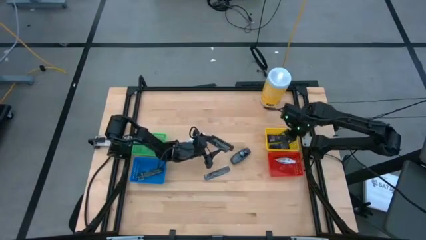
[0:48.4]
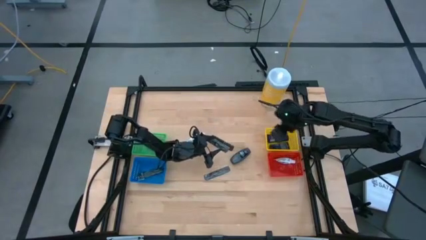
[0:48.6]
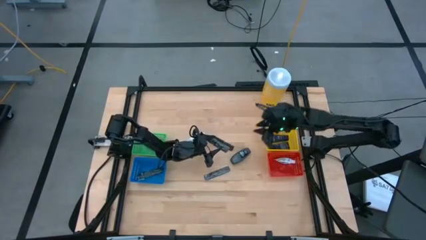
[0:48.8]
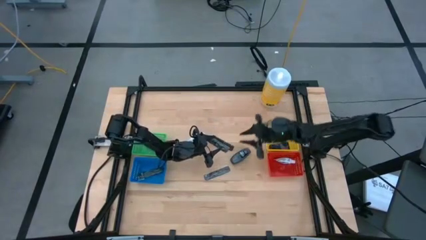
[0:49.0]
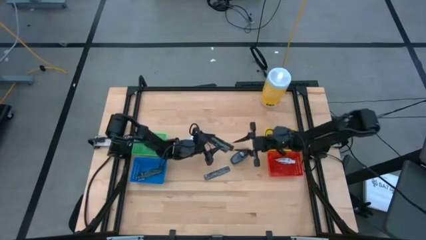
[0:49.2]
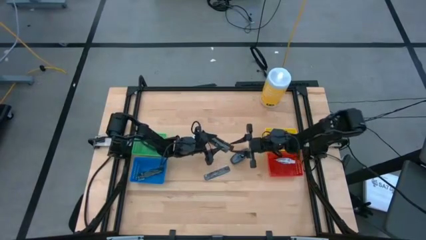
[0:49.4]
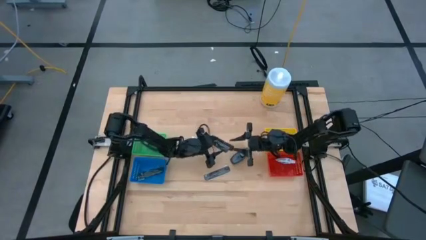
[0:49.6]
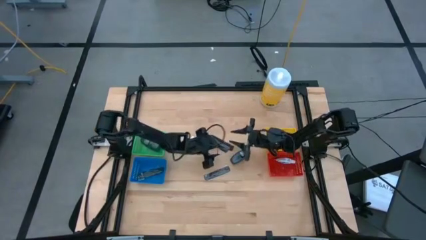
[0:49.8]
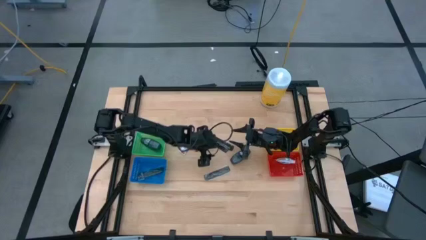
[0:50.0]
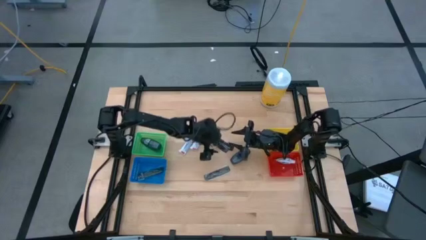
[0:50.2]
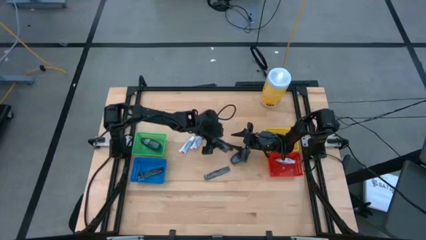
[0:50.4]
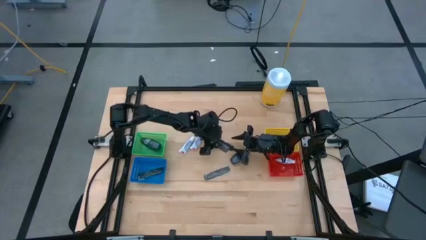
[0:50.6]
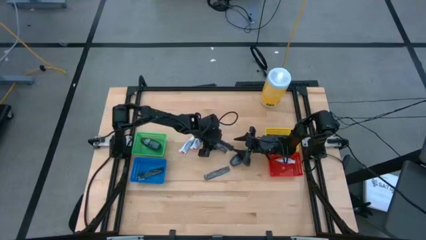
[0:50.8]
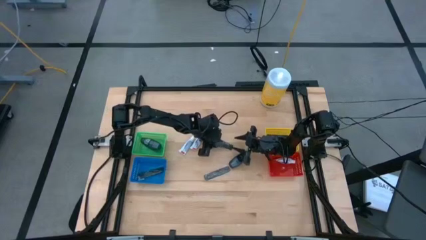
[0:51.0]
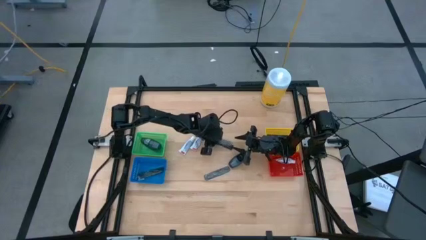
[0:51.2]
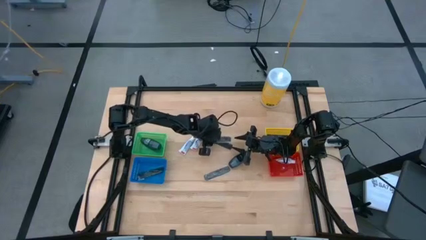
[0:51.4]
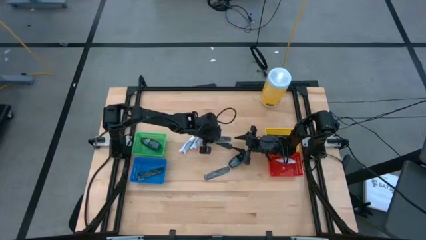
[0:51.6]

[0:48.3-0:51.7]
Task: Pick & Place Travel size toiletries
Put the black comb into the blue bin

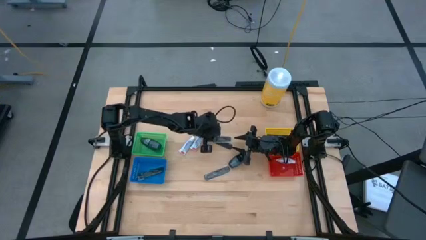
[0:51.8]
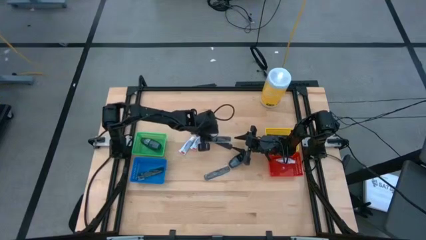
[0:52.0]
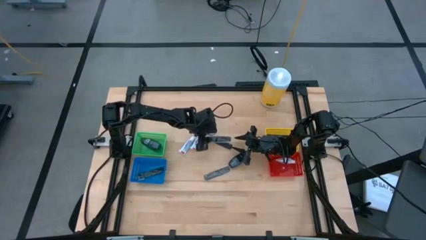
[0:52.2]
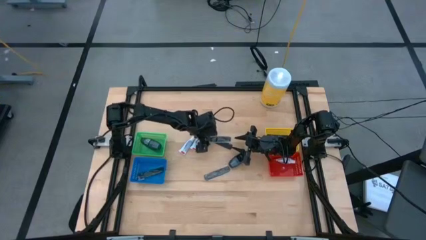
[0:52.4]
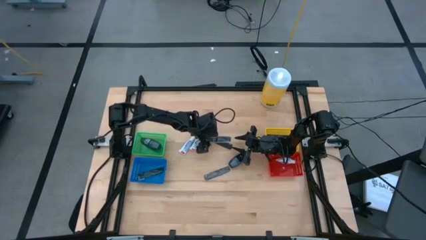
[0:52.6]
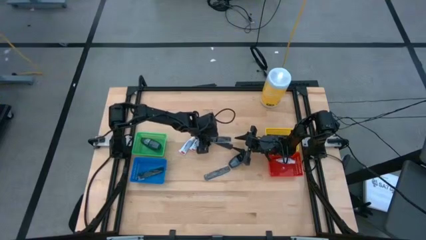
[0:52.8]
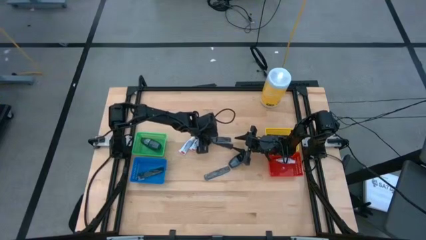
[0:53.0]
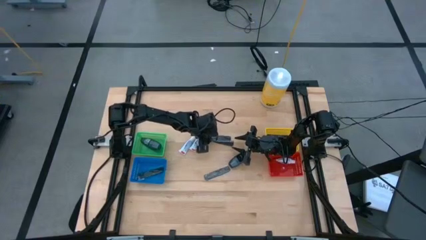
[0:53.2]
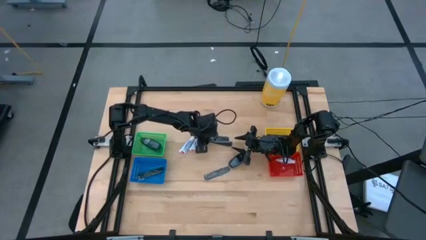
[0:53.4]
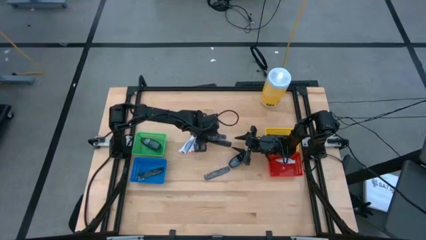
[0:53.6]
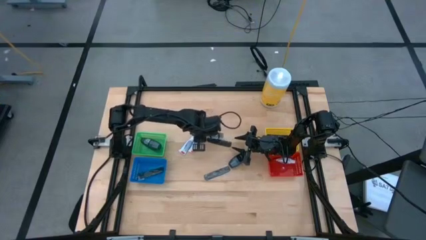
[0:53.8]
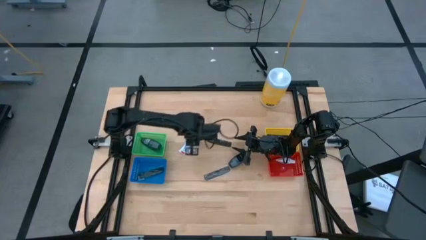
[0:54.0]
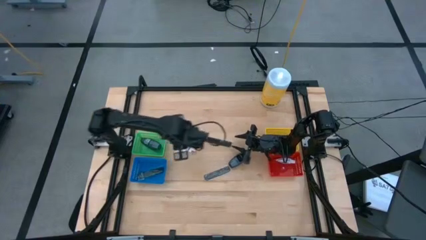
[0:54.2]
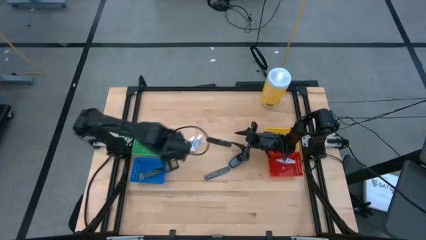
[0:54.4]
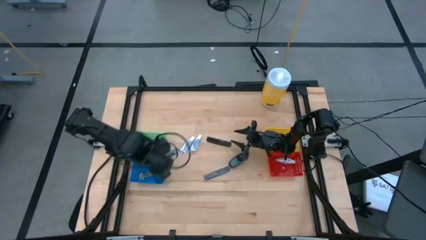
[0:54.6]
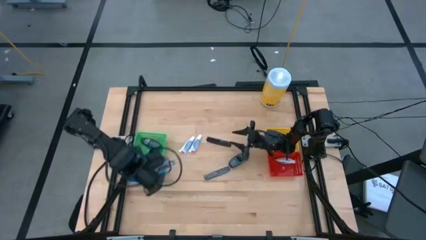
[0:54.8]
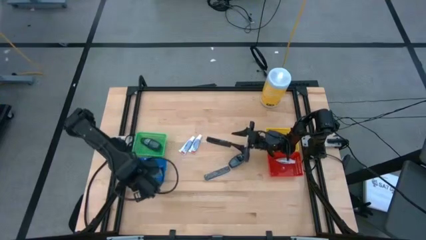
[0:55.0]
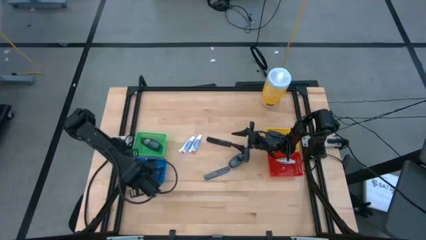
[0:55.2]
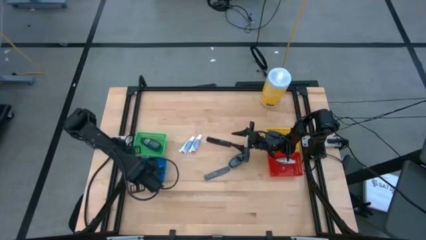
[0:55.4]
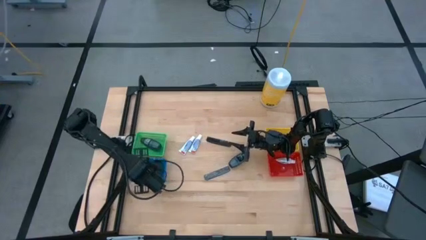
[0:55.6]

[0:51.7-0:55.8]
Put the black comb into the blue bin

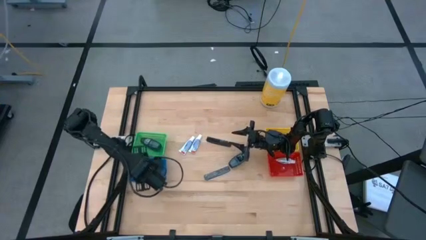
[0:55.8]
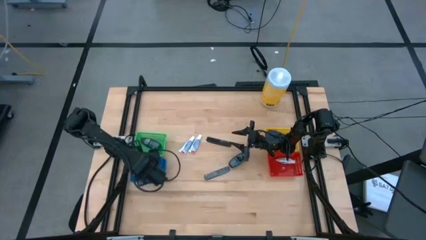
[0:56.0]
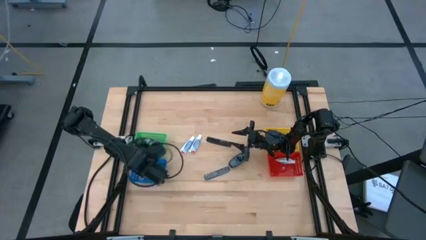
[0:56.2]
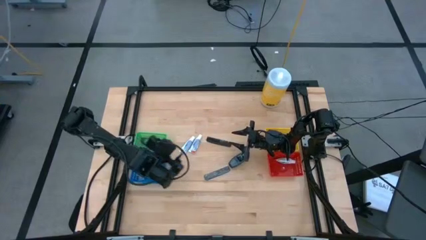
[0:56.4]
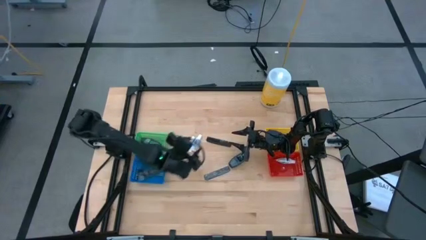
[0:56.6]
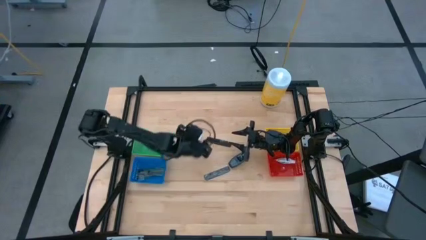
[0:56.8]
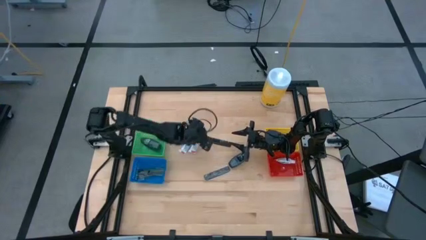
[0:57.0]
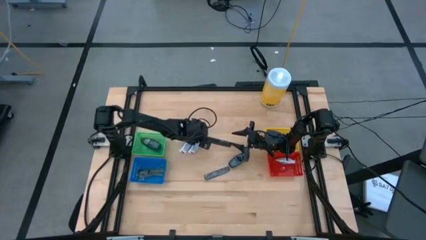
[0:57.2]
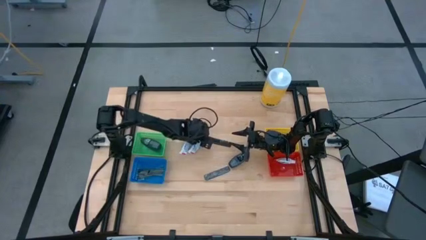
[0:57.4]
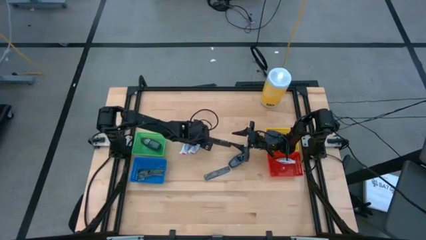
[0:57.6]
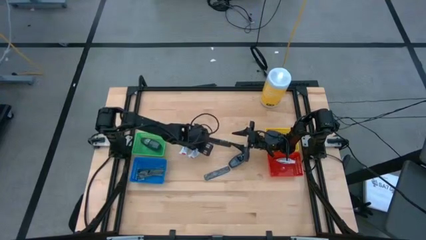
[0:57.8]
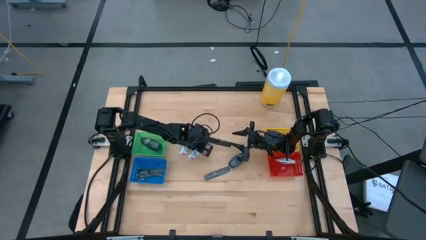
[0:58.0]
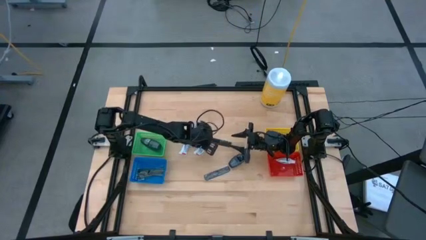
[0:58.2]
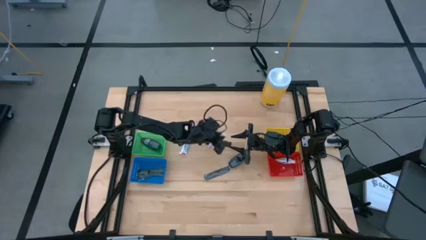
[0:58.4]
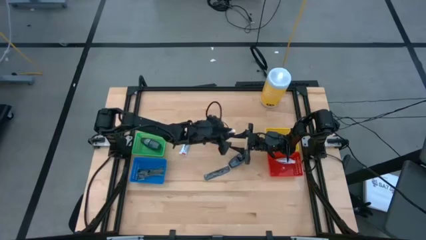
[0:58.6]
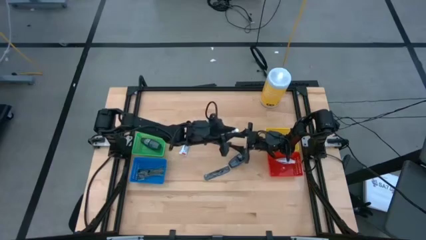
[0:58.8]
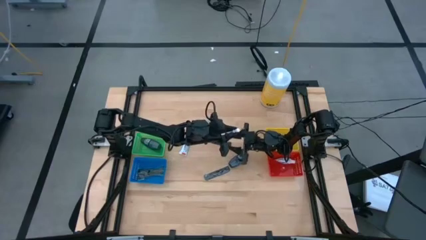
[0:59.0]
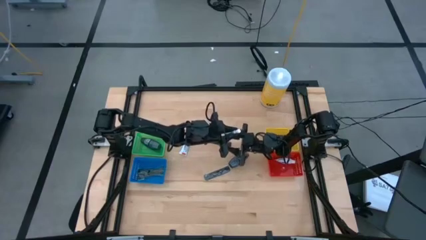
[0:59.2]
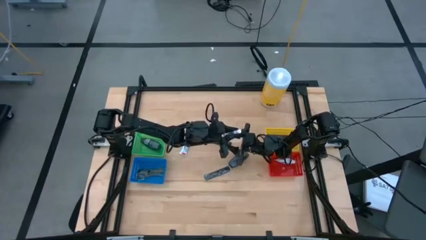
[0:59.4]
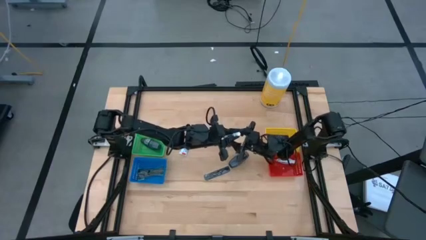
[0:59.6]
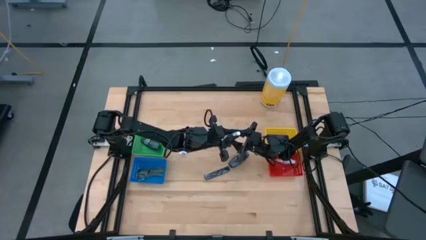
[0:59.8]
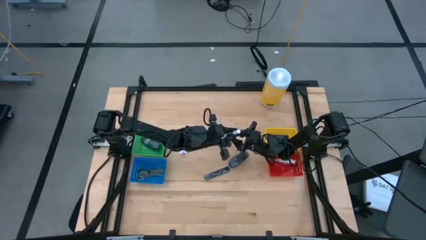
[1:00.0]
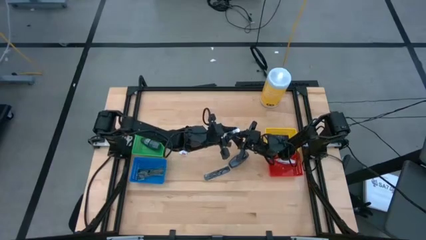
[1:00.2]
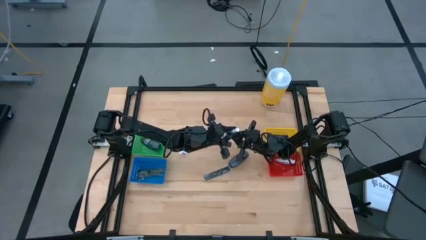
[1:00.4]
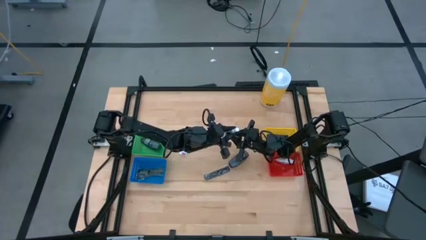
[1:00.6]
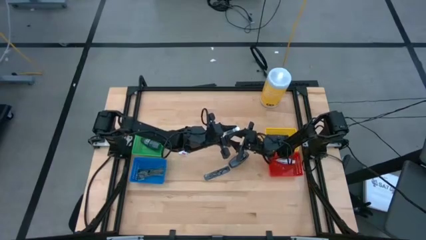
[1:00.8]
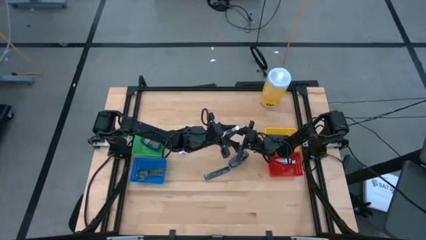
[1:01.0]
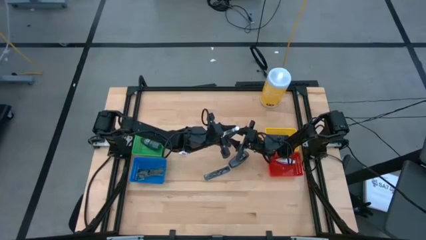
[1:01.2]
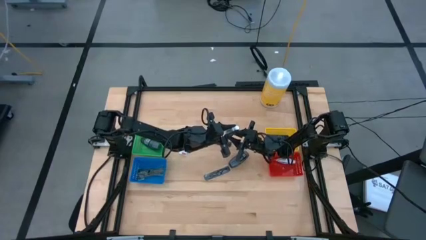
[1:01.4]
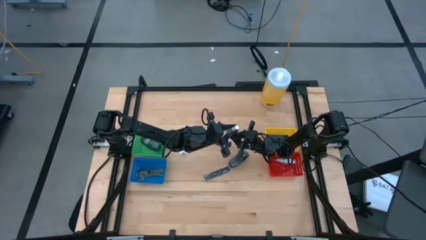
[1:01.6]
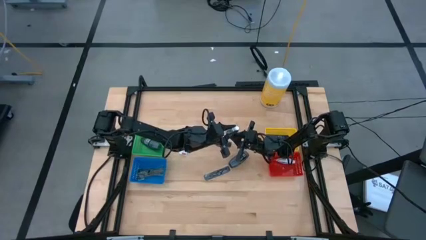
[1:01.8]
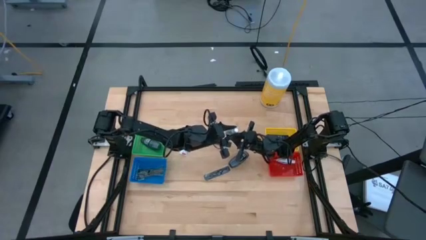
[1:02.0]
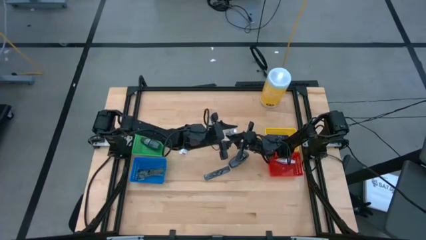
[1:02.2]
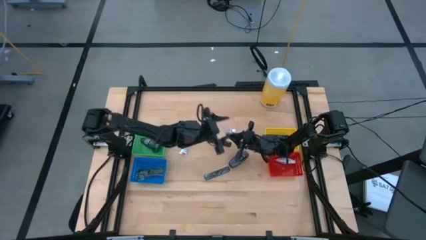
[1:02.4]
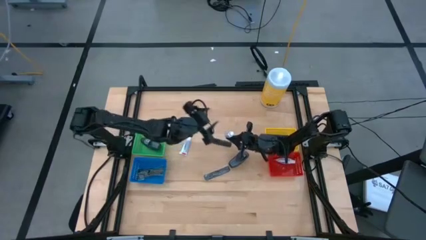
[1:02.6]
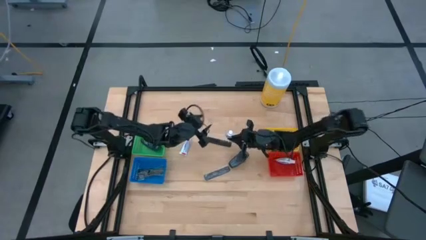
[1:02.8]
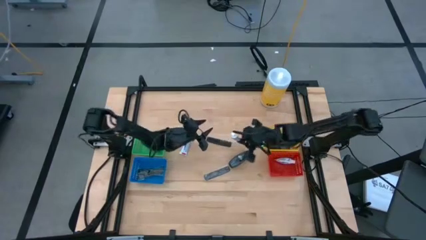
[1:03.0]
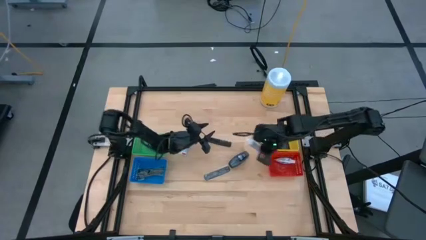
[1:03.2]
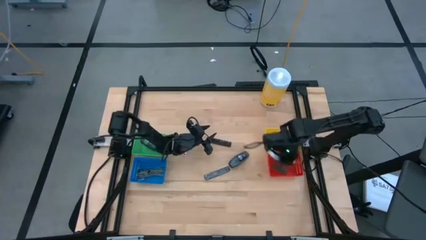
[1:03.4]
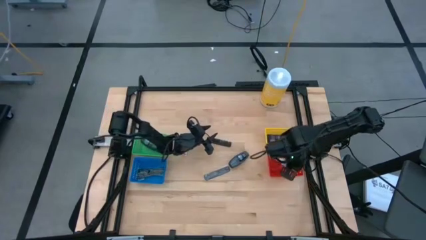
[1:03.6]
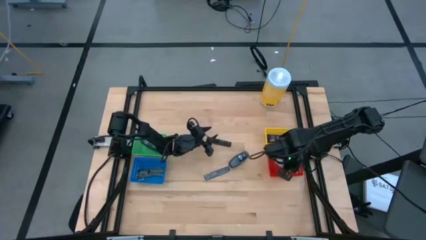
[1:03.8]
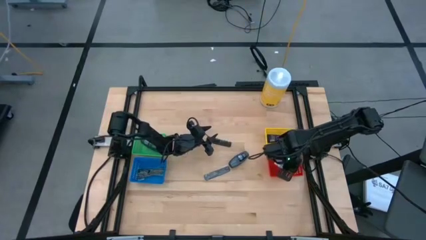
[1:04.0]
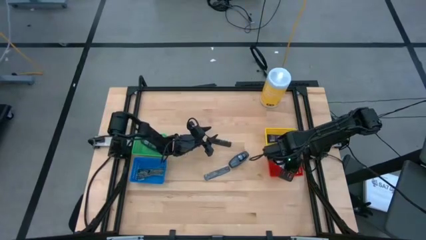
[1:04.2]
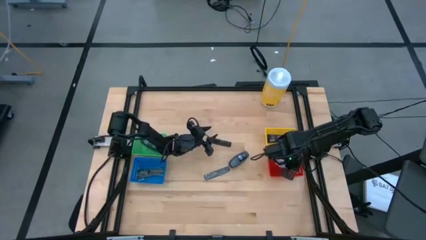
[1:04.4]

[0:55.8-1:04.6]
Put the white toothpaste into the red bin
